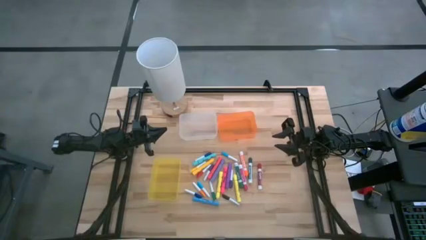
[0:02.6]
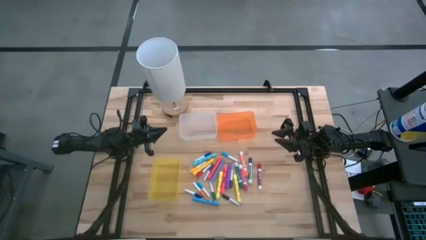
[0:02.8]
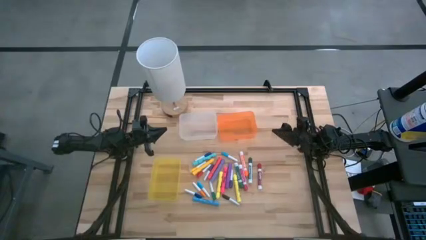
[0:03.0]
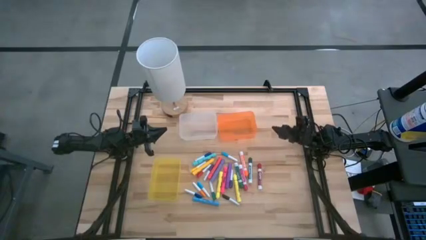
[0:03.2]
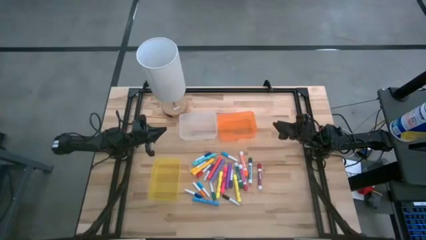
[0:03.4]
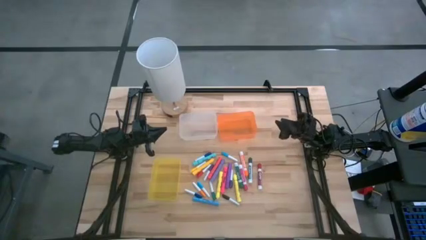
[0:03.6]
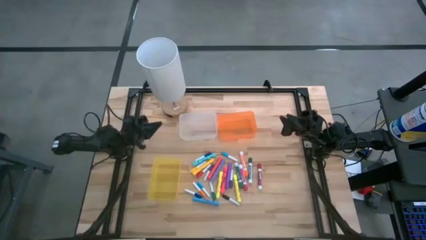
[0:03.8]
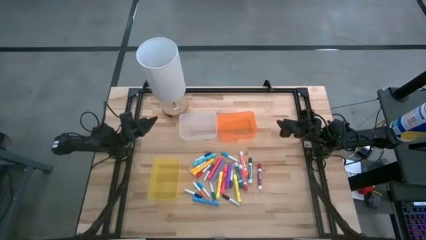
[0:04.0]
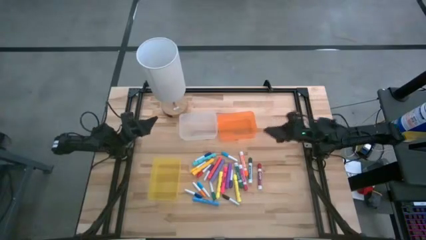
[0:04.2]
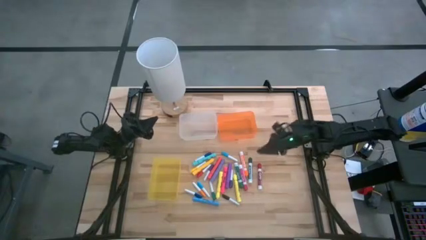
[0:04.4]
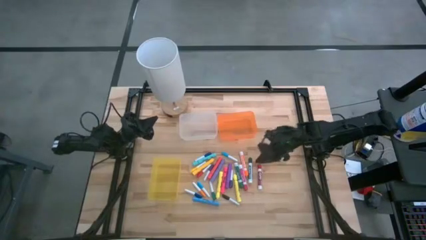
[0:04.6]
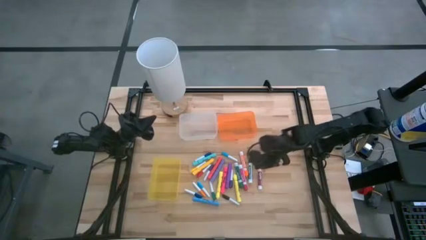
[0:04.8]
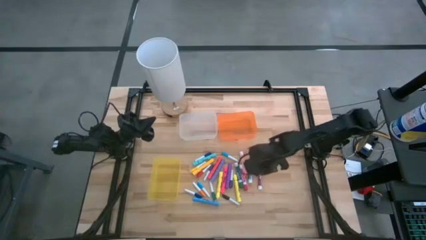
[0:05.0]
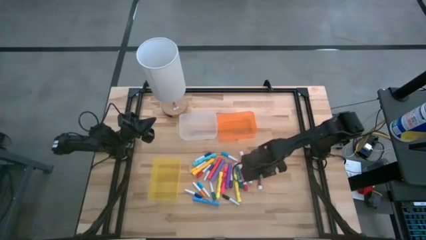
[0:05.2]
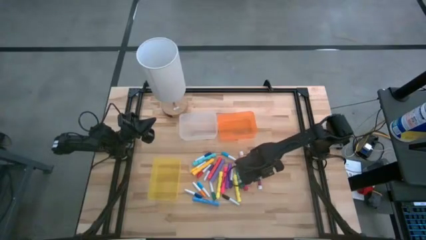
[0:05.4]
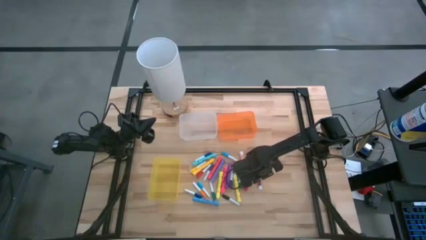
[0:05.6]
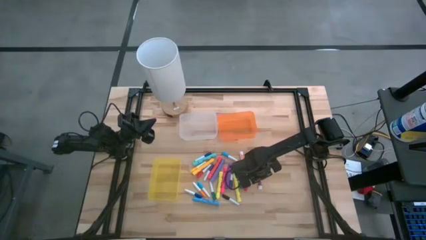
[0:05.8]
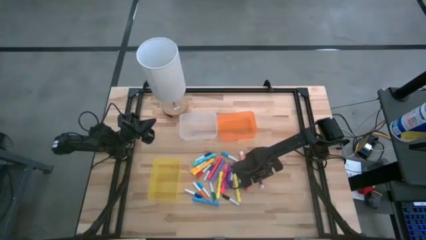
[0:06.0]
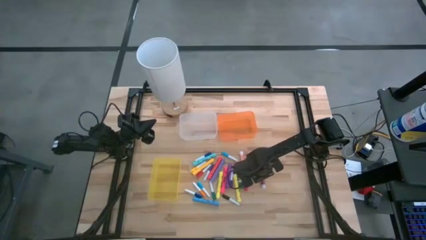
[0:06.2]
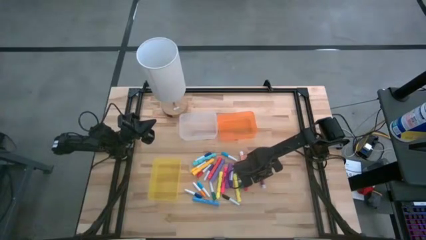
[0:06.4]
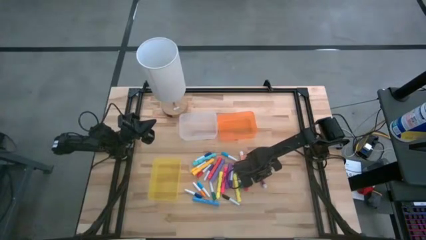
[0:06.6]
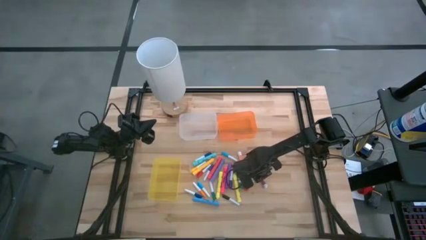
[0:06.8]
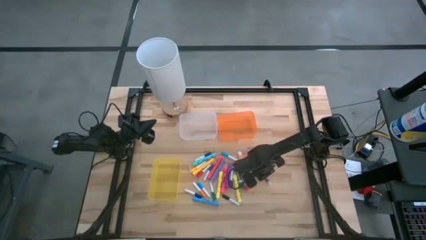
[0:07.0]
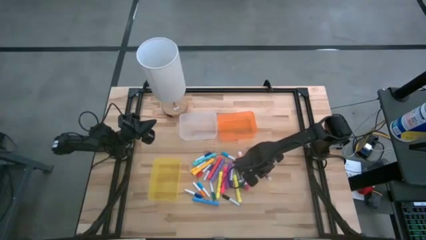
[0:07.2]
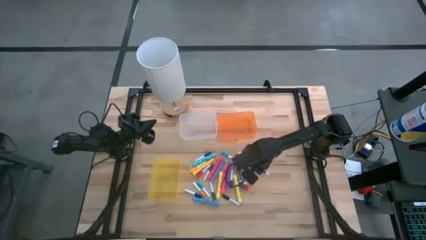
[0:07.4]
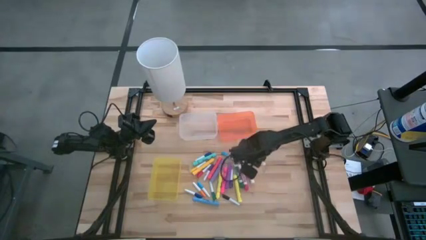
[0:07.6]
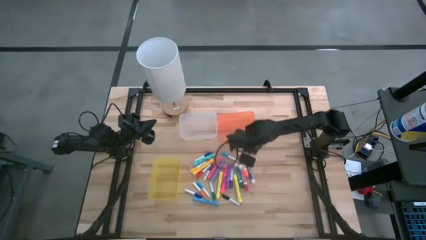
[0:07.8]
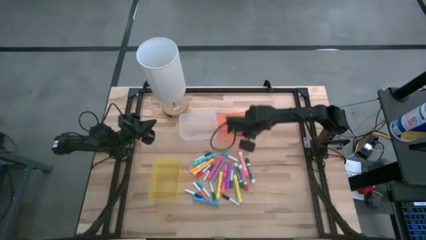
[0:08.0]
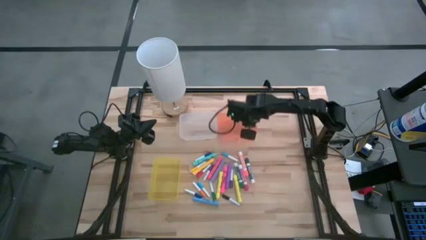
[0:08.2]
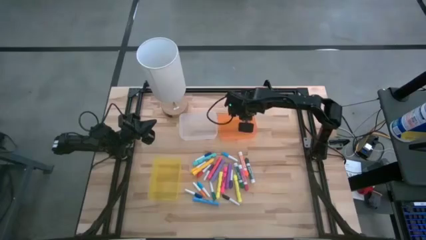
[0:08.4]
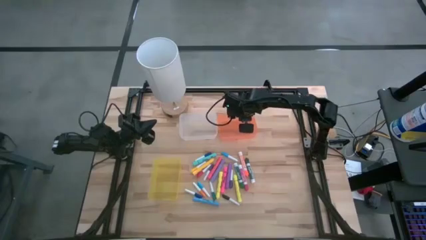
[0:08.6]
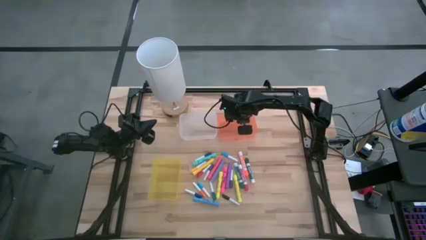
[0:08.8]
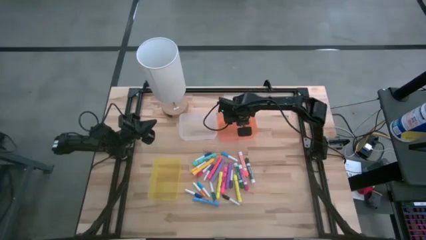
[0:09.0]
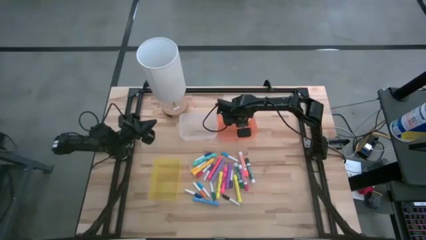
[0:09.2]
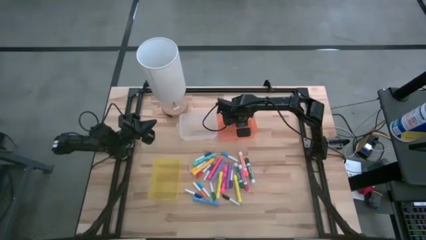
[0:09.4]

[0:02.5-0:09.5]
Task: Pick & Place Markers
Put the red marker into the orange bin

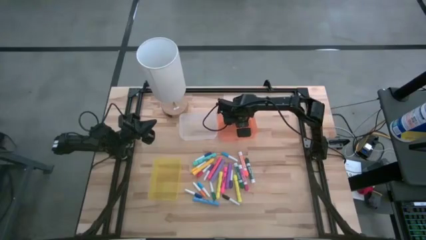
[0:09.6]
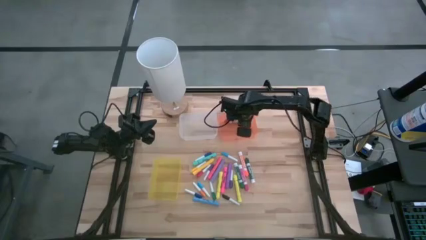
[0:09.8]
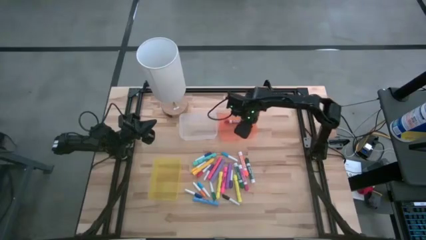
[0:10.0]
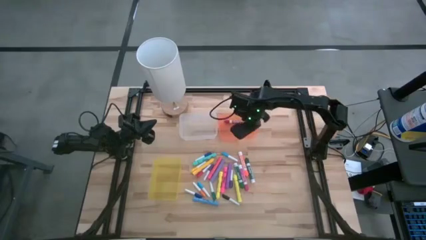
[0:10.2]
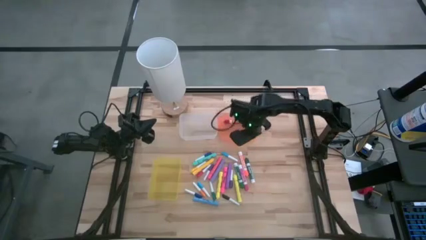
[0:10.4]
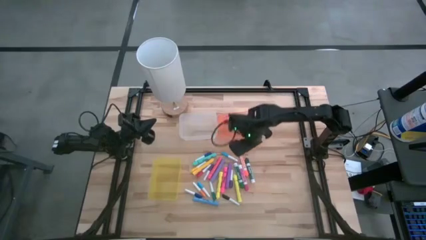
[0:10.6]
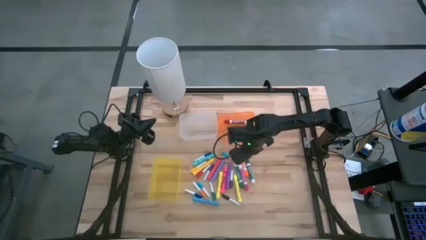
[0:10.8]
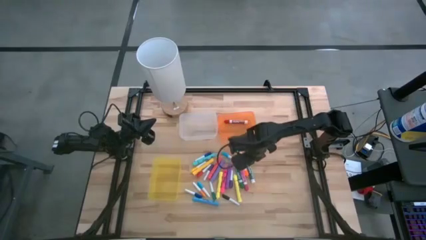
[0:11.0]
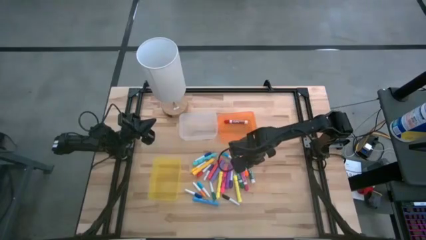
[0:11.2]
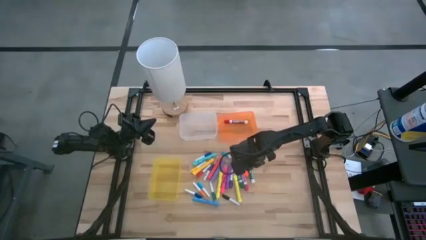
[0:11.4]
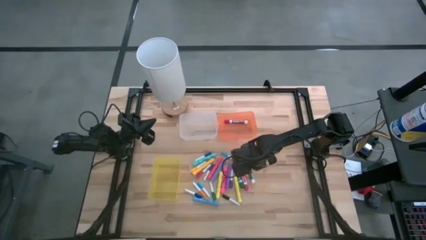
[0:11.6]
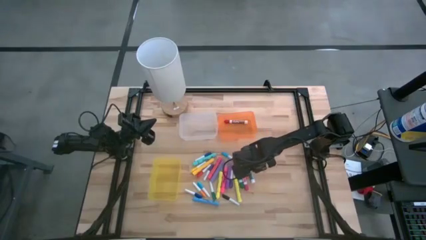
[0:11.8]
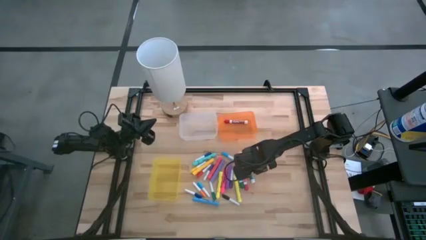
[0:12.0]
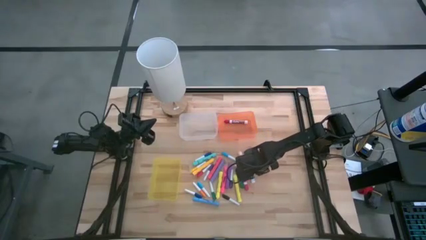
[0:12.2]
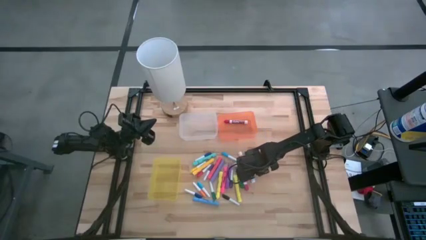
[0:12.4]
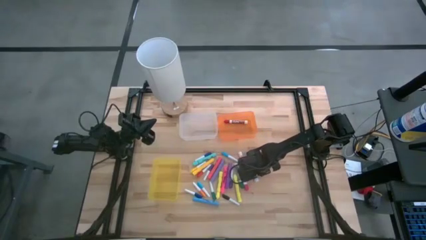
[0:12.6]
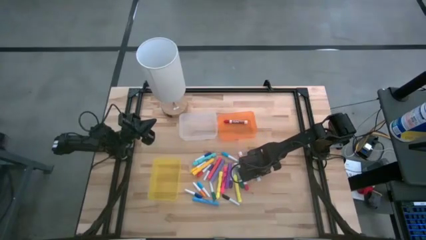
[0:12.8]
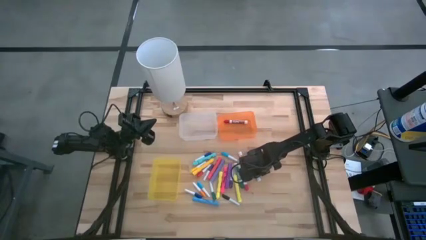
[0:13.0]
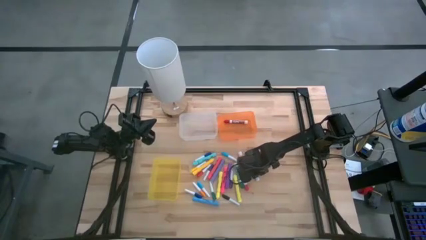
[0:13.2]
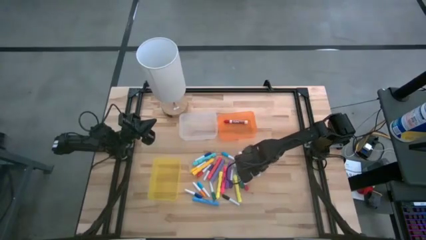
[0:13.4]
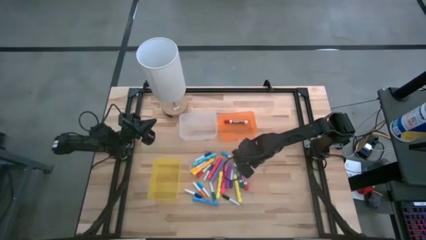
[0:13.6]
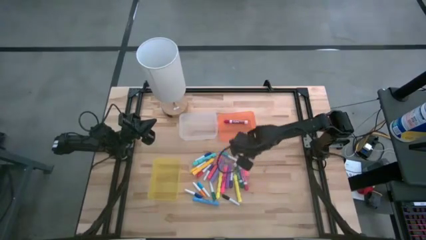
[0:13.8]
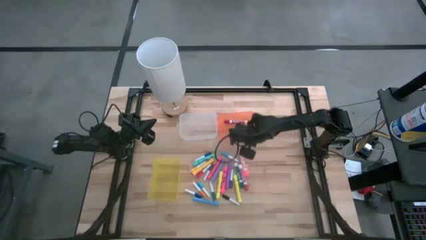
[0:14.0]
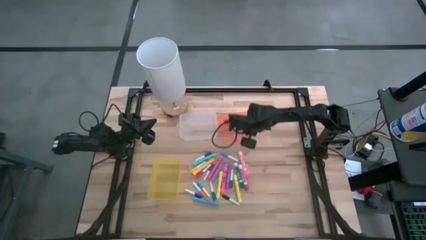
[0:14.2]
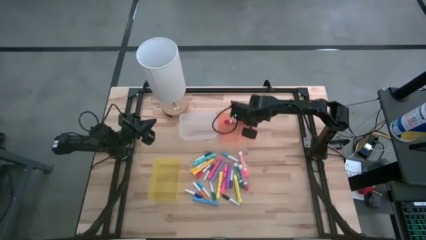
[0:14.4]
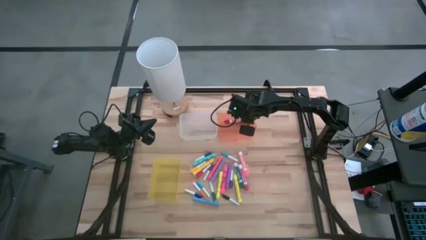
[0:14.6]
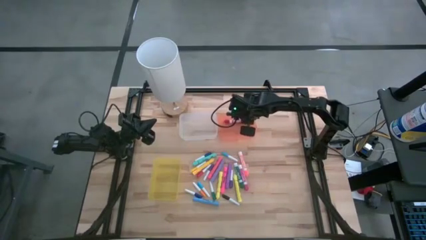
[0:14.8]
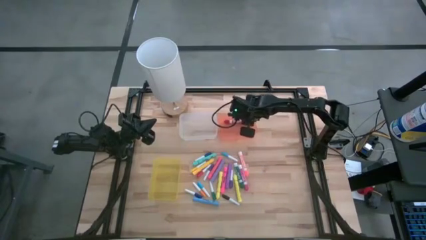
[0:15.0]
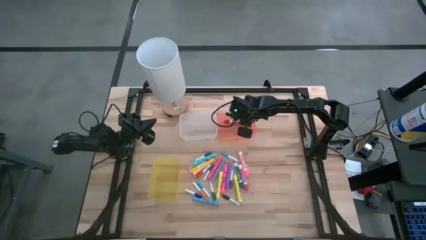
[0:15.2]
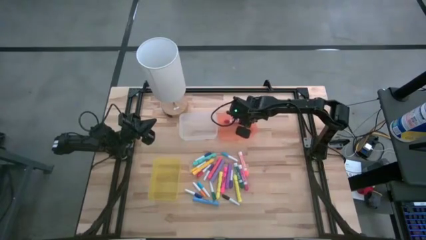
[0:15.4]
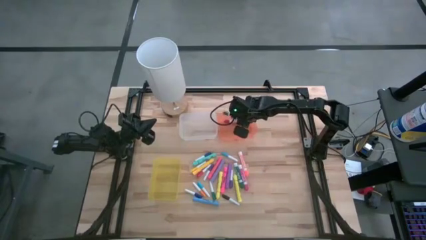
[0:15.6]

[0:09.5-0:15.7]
Put the dark green marker into the orange bin

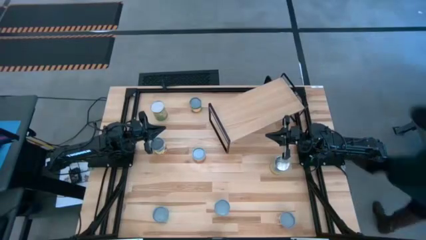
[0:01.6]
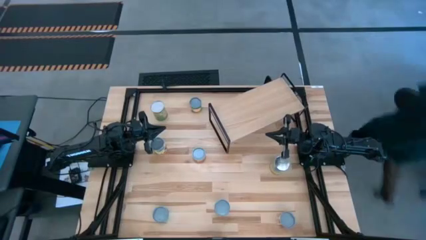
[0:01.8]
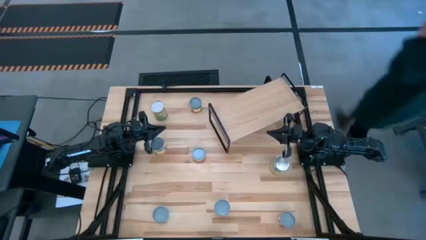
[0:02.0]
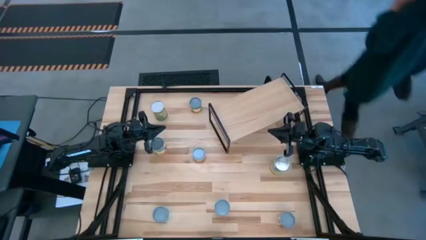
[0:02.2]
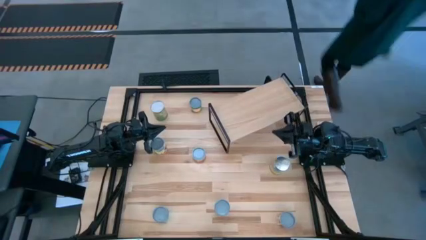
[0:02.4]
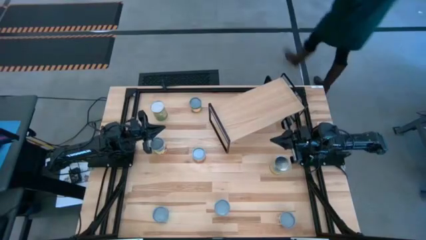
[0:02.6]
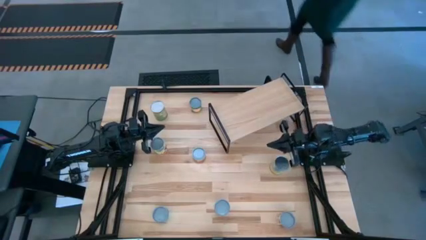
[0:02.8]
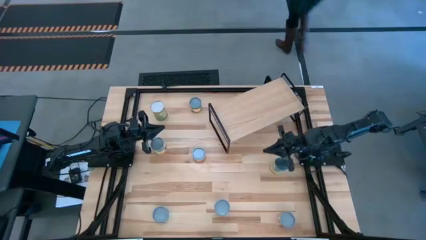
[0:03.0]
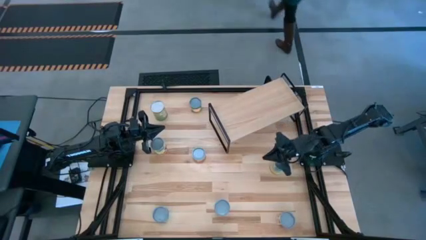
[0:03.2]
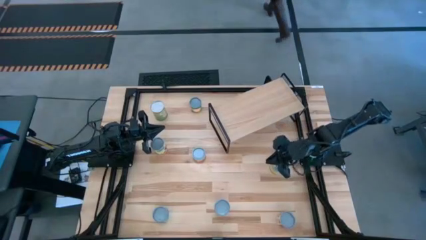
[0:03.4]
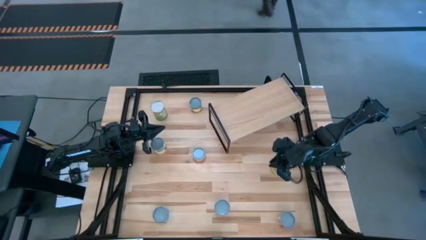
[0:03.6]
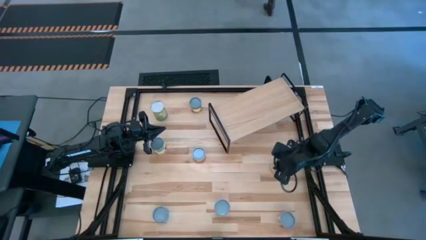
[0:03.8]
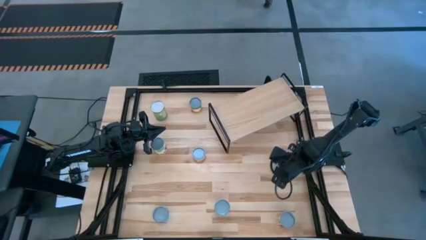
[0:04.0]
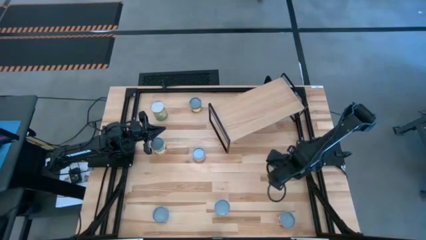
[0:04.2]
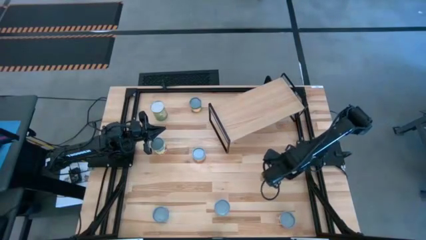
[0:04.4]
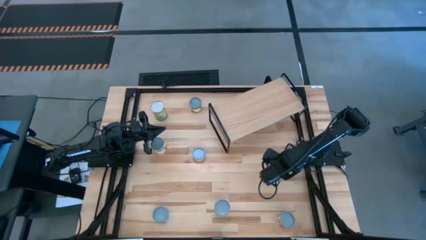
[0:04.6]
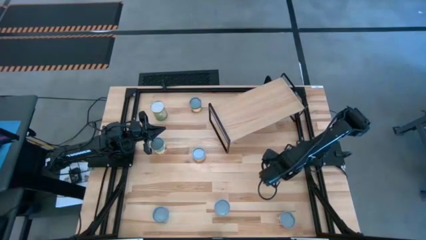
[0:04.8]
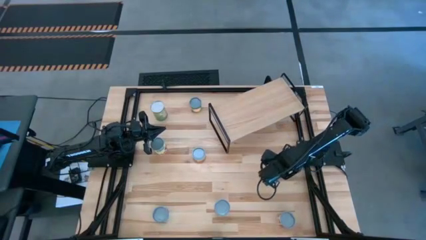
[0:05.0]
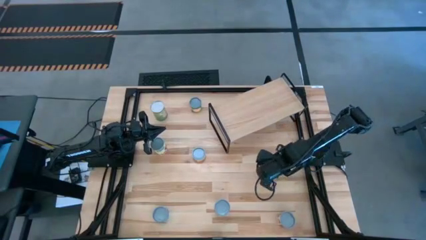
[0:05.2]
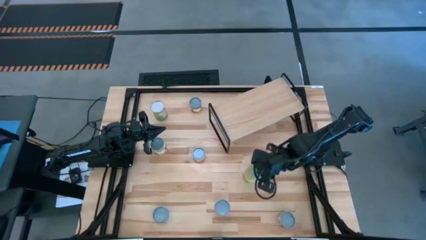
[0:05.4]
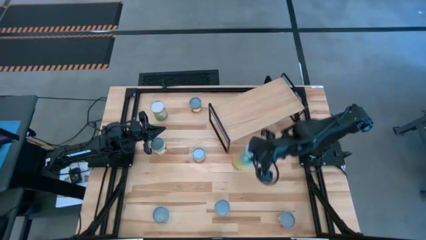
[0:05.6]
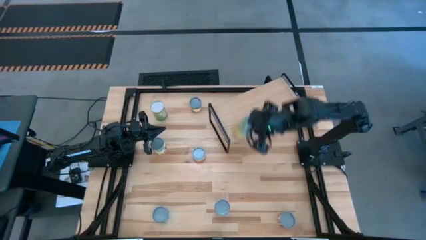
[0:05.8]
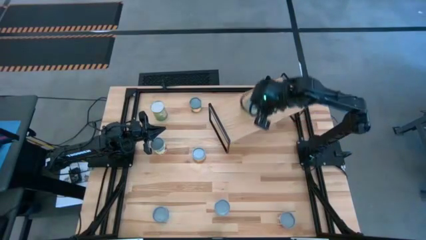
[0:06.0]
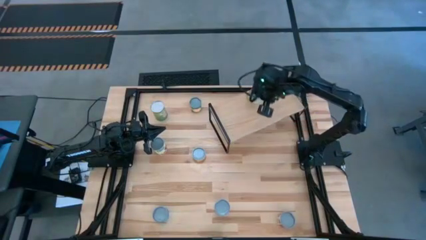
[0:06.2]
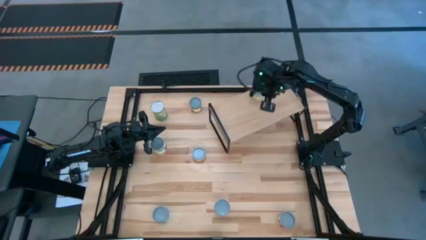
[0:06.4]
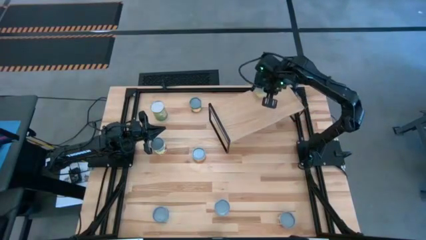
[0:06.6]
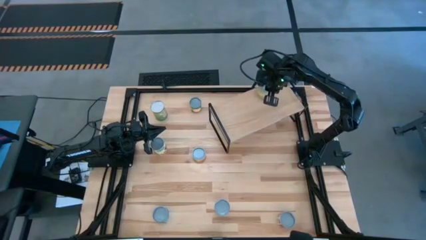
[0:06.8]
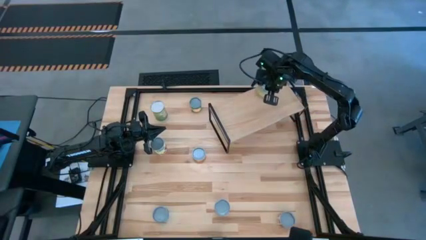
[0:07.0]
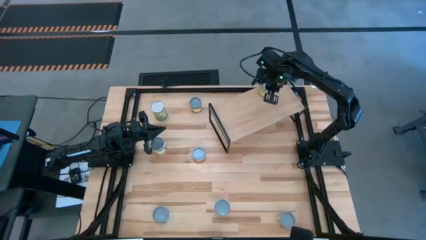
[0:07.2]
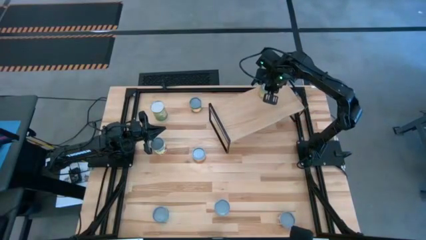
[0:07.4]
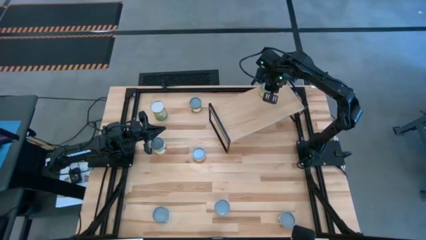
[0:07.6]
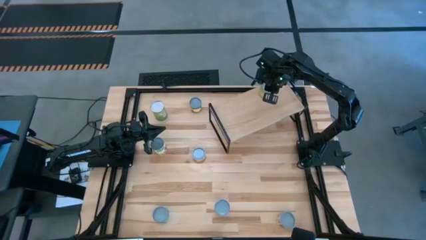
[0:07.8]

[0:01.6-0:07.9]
Task: Pick and place cans onto a shelf
Put the canned carrots on the shelf
